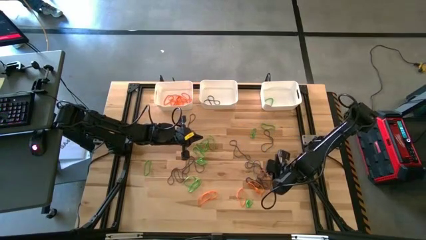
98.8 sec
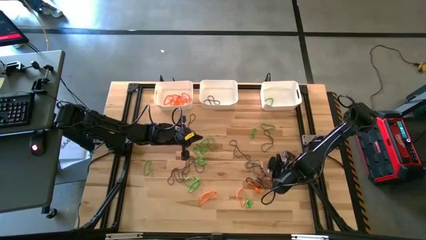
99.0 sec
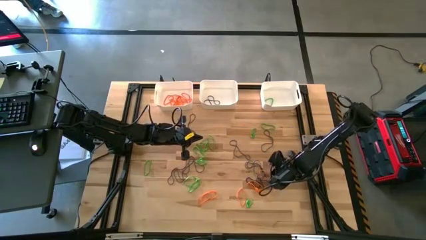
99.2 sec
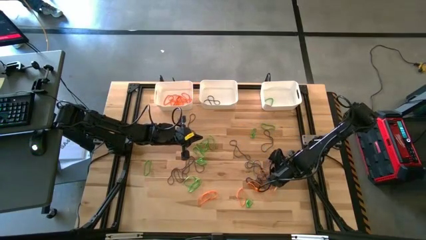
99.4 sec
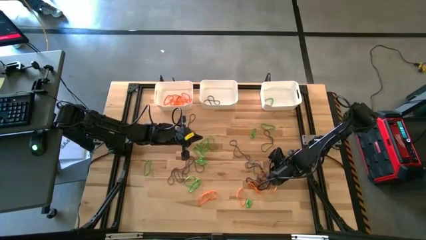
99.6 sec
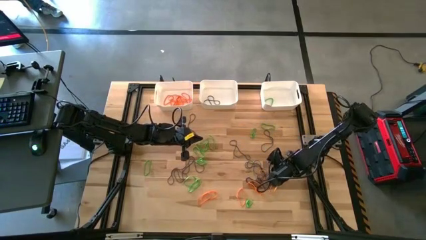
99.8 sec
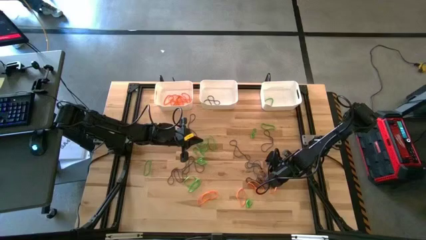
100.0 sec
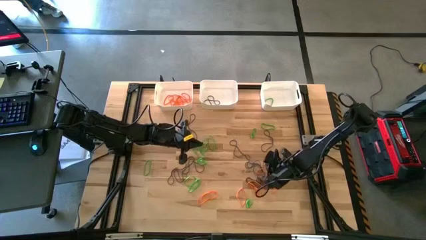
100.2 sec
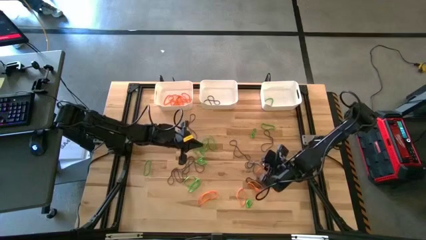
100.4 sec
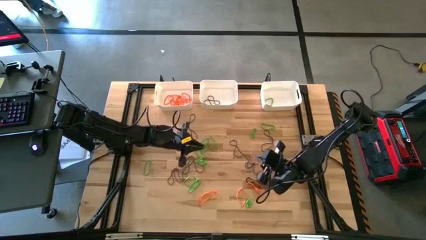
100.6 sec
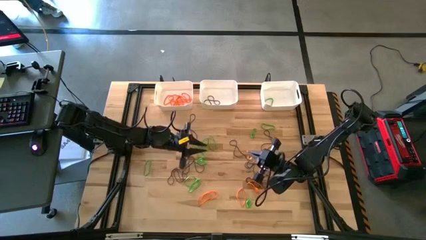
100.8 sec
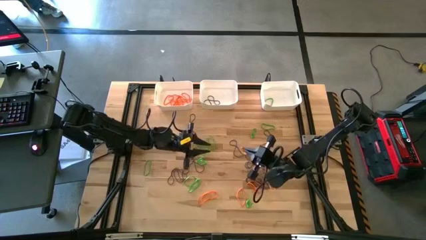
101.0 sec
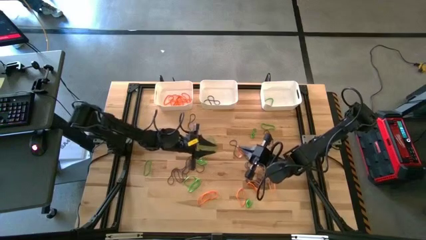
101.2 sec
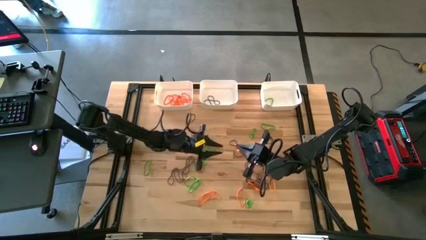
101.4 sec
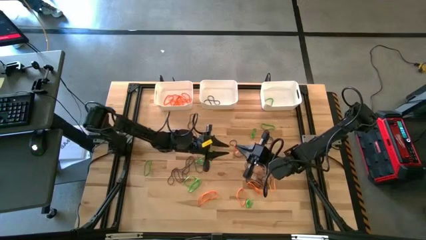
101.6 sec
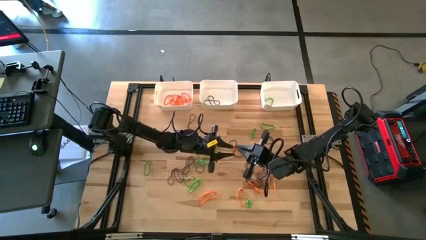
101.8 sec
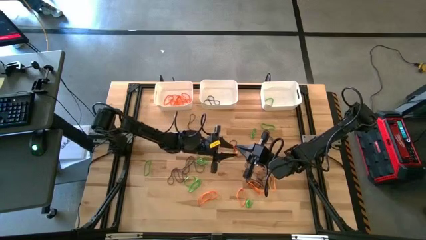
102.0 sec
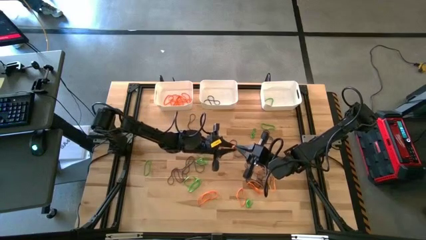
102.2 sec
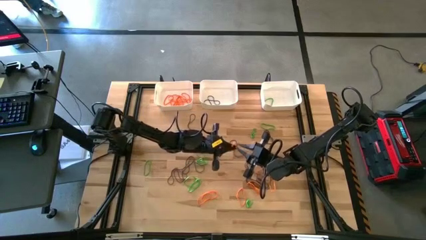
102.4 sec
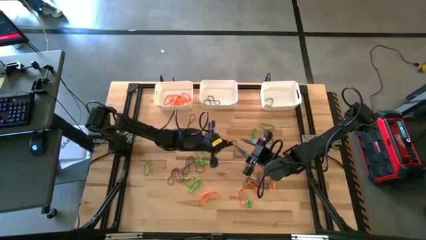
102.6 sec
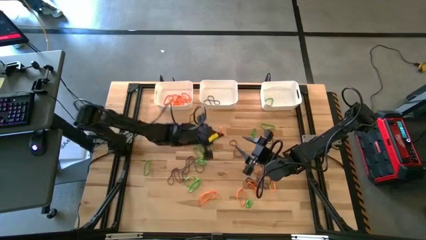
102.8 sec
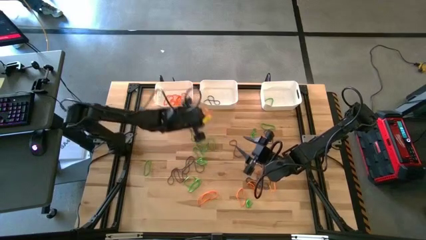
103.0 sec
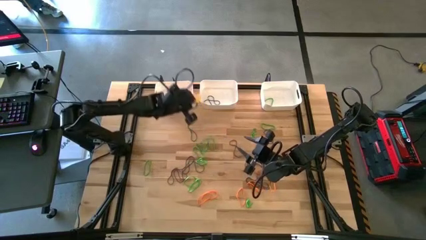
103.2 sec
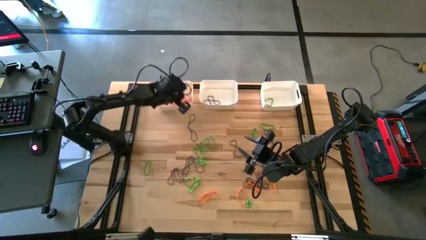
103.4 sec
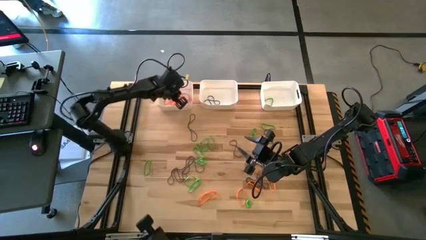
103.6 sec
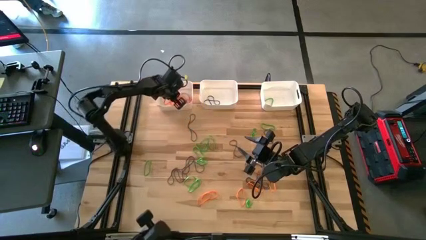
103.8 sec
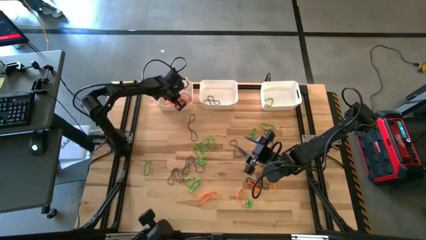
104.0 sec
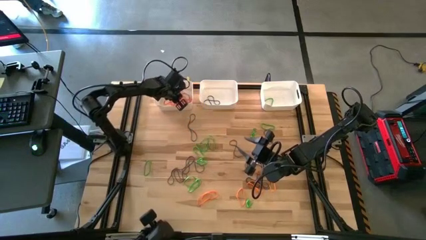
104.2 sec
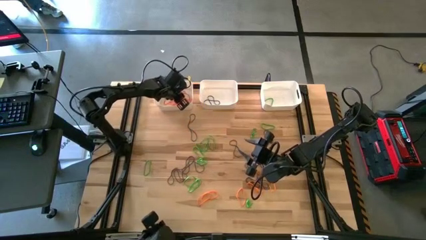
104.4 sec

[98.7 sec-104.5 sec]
Task: Sort rubber bands into baskets
Put the orange rubber band into the left white bin

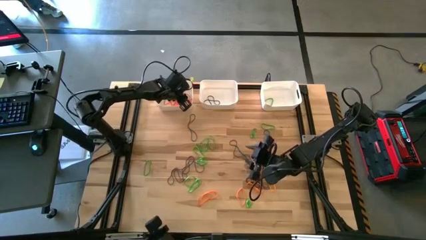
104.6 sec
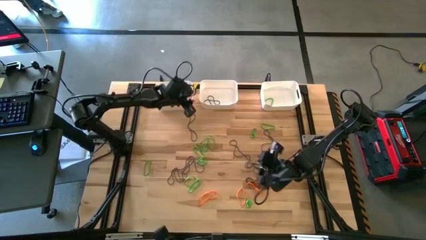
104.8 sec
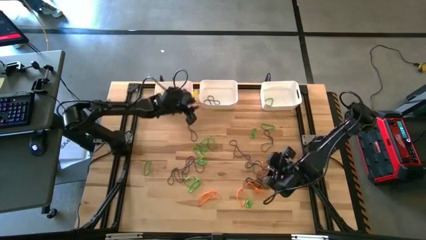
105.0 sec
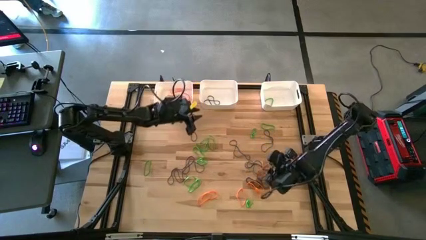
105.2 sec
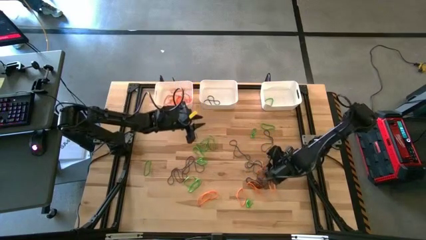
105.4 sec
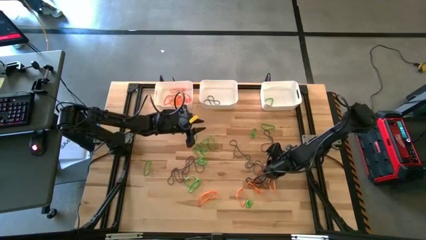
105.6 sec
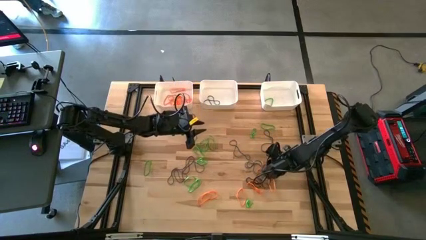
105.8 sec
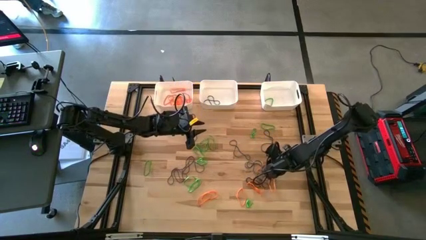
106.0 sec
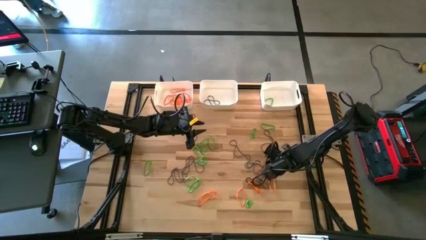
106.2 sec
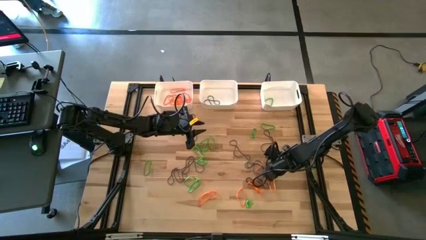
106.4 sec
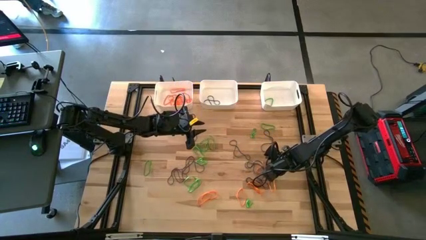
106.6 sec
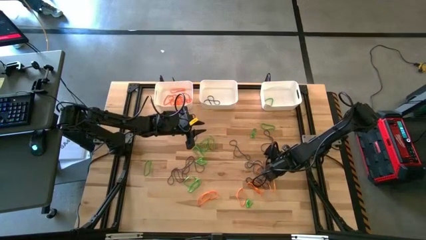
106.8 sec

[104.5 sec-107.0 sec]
Put the orange rubber band into the left white bin

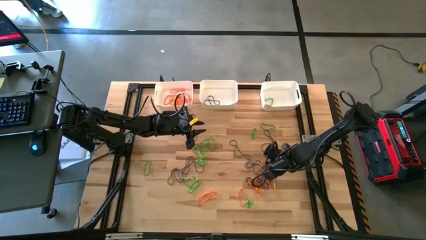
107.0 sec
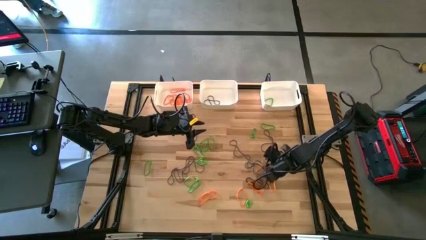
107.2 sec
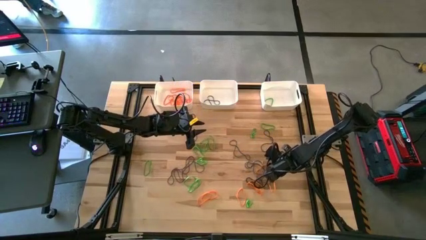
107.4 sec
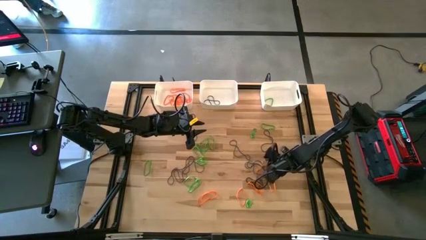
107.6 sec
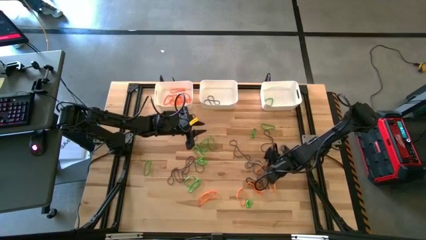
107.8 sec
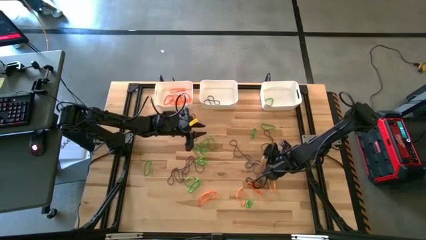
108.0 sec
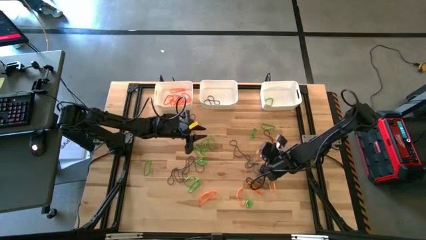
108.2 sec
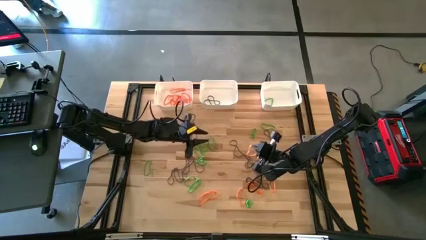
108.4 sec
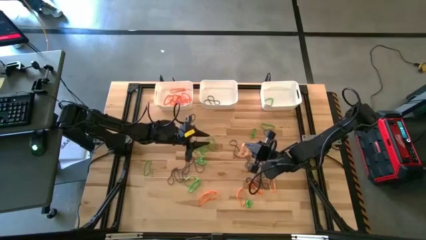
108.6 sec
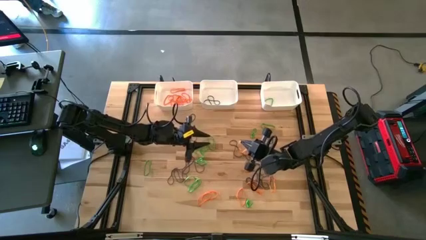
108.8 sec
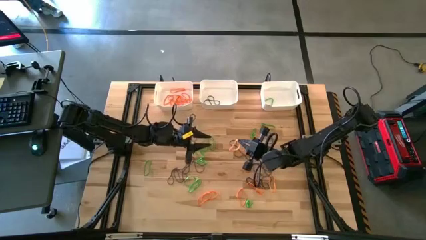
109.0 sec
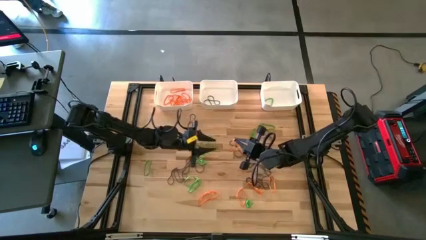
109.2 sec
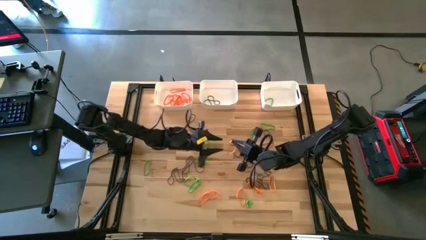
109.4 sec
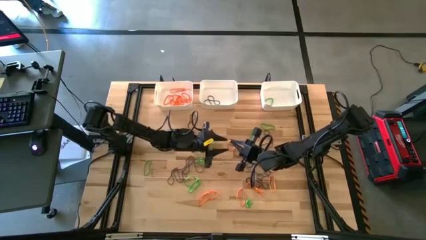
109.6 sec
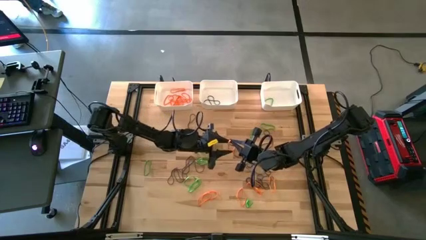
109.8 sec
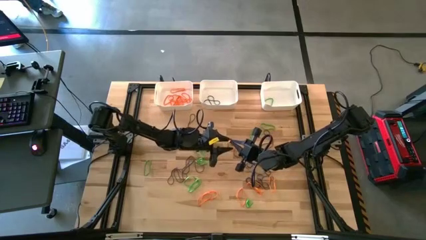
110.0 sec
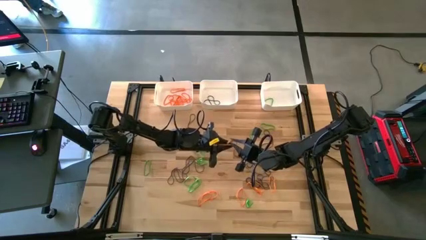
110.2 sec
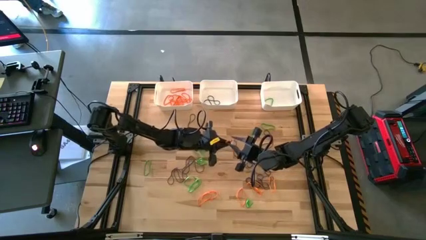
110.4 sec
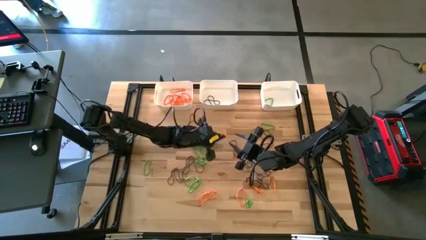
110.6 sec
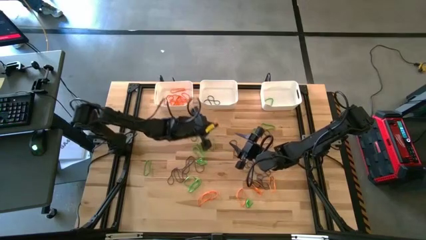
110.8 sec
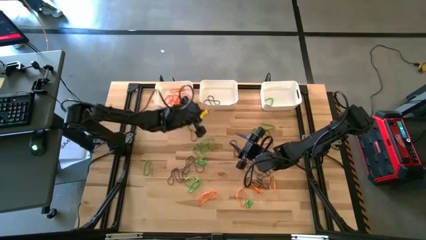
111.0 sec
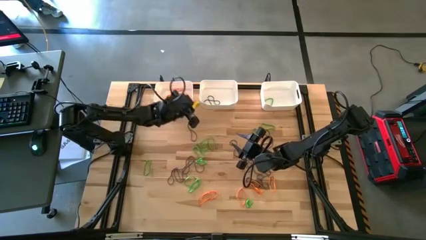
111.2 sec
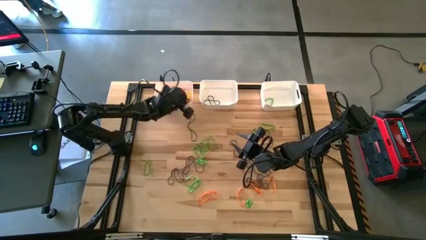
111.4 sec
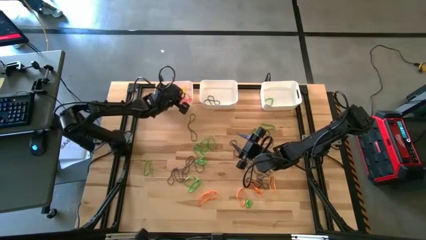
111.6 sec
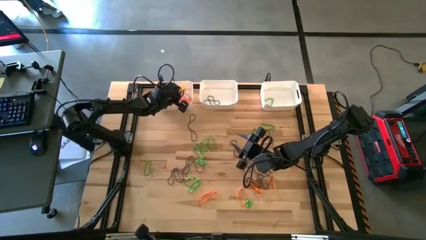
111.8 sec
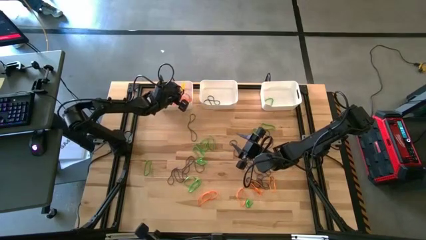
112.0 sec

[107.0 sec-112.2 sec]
Put the orange rubber band into the left white bin

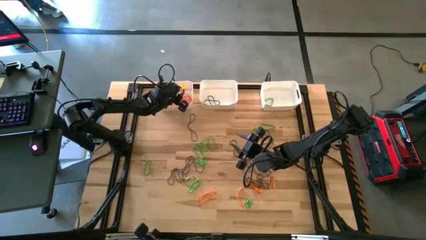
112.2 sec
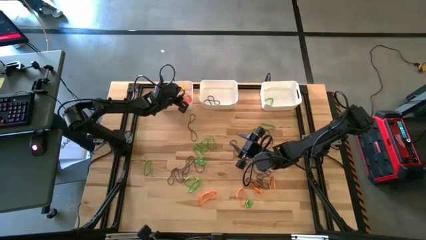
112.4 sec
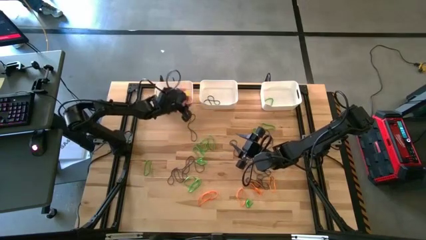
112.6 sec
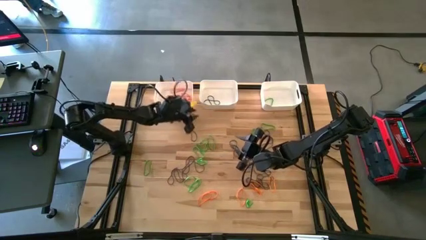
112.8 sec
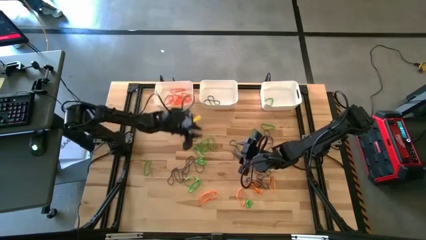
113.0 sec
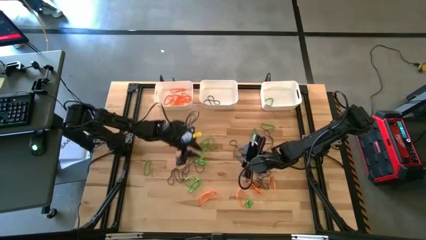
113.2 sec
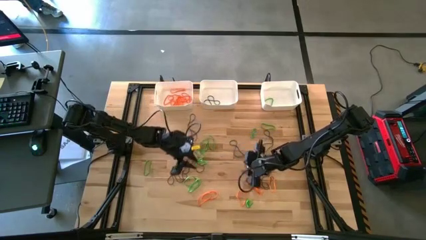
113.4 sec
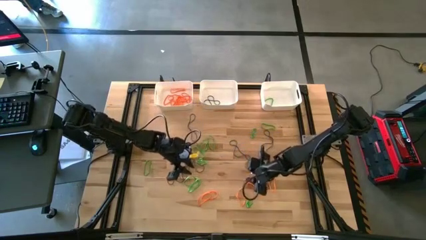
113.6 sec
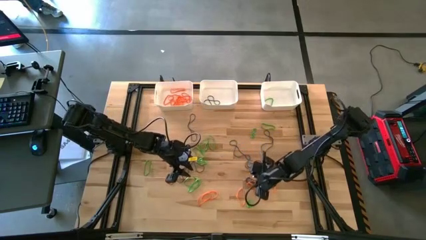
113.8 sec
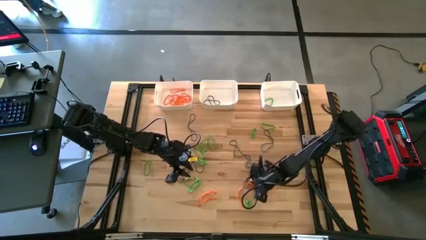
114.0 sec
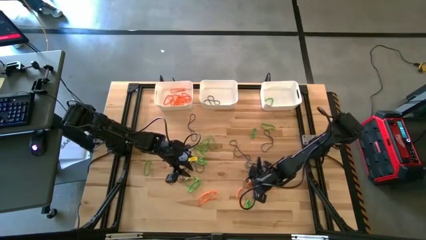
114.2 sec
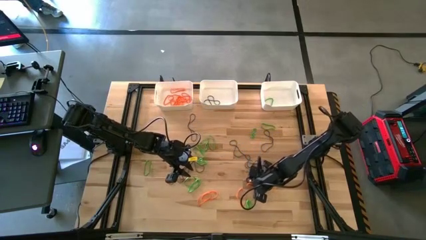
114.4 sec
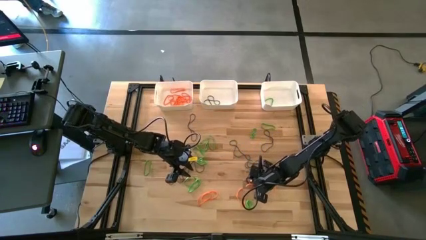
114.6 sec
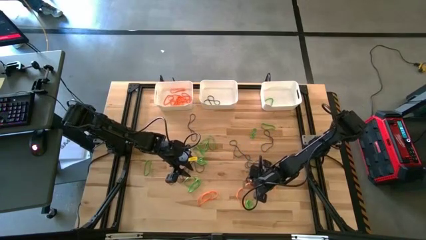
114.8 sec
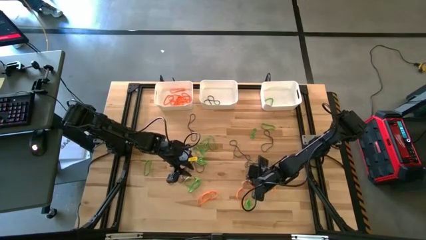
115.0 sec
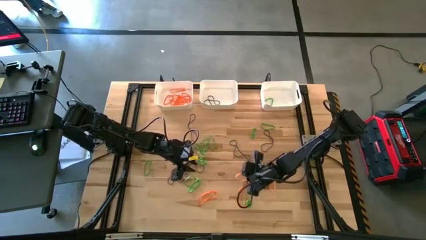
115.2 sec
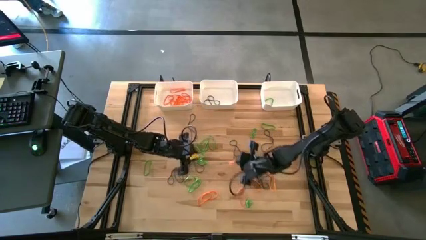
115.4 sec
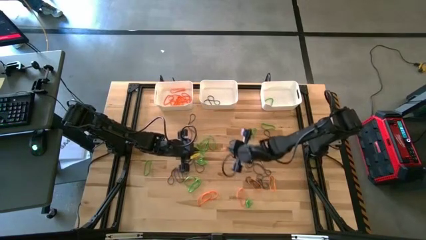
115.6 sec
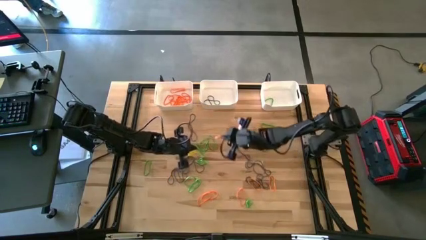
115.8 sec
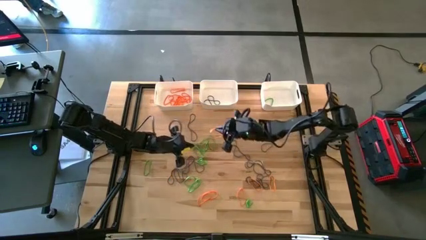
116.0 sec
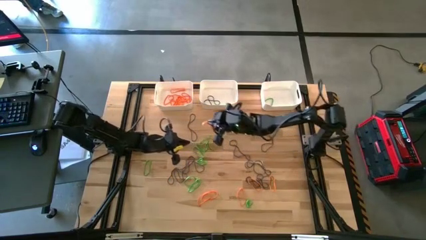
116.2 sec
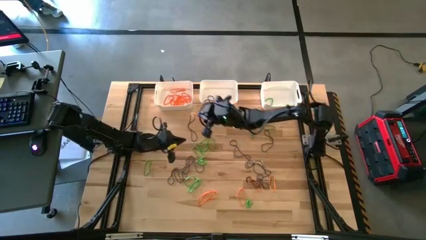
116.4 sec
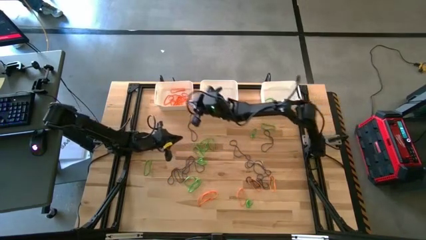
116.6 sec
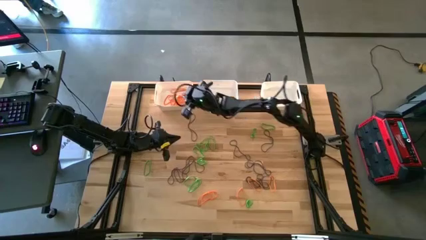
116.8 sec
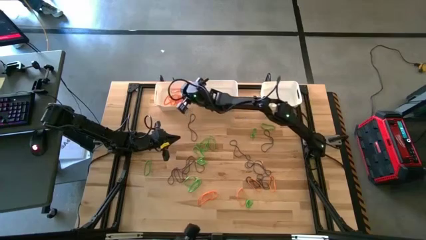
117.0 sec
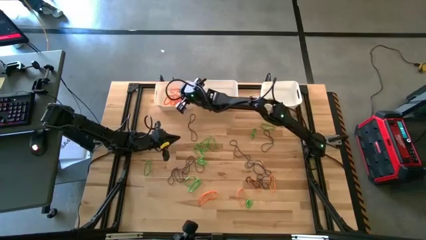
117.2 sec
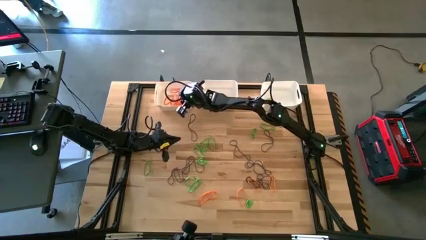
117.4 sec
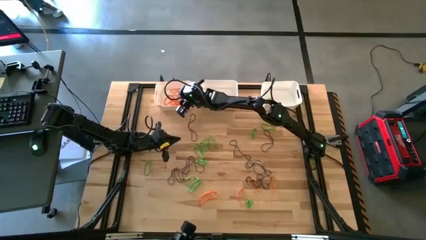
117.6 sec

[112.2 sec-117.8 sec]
Put the orange rubber band into the left white bin
